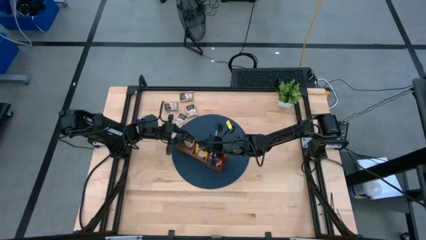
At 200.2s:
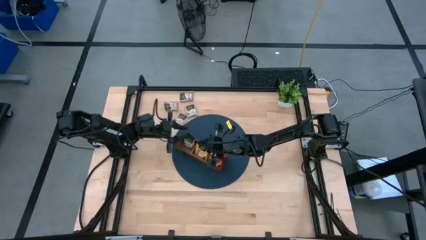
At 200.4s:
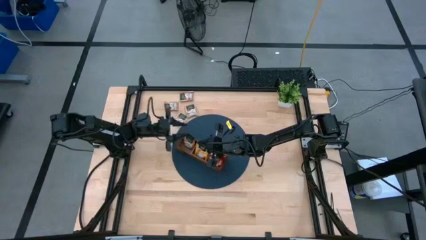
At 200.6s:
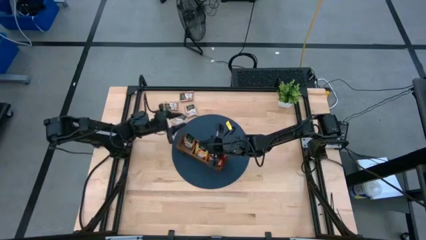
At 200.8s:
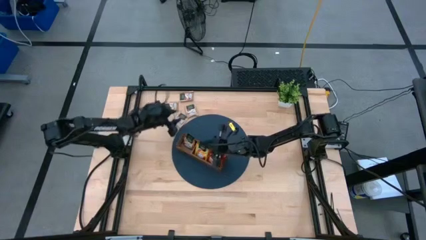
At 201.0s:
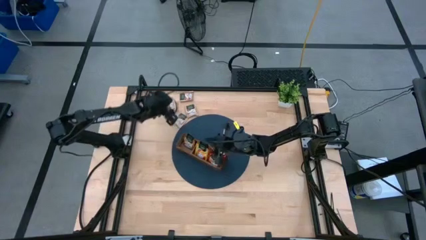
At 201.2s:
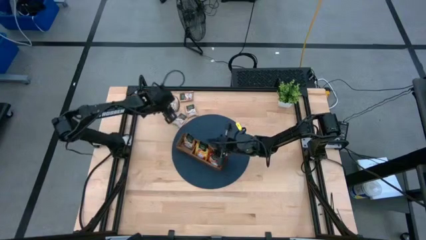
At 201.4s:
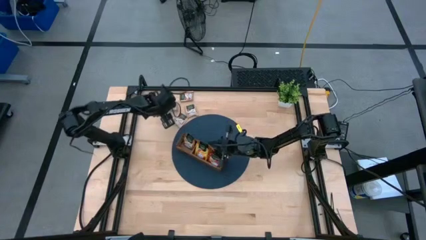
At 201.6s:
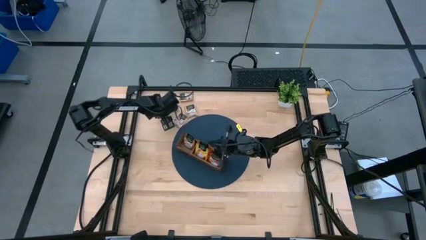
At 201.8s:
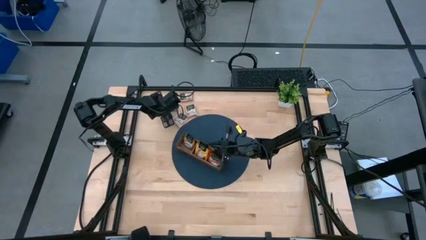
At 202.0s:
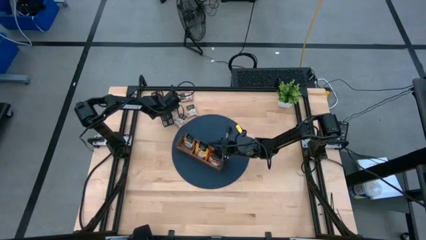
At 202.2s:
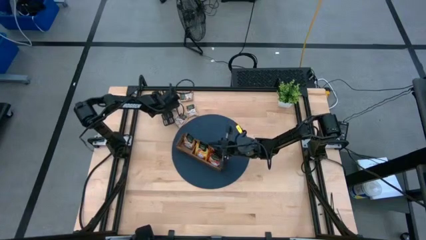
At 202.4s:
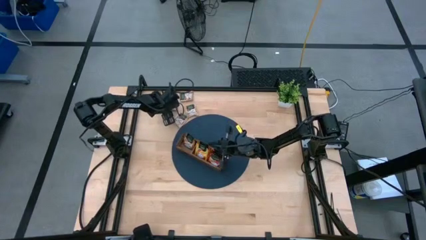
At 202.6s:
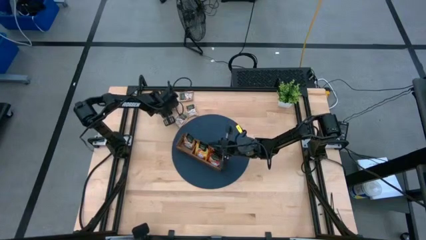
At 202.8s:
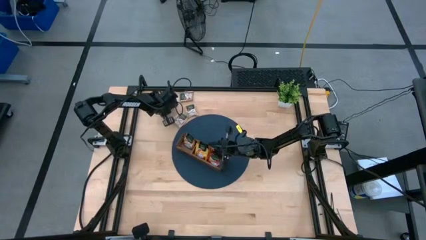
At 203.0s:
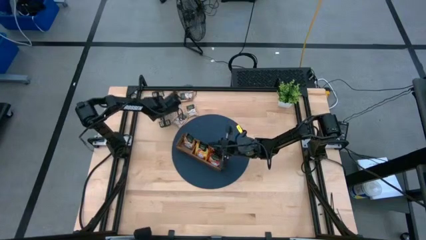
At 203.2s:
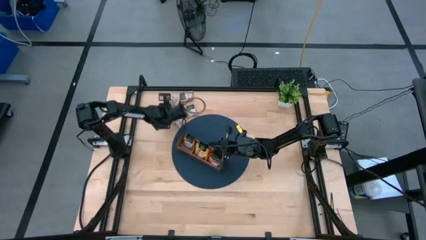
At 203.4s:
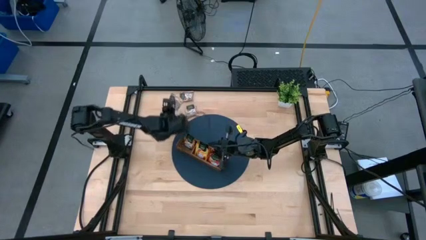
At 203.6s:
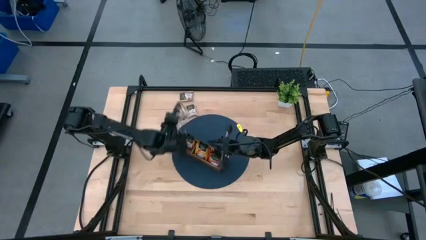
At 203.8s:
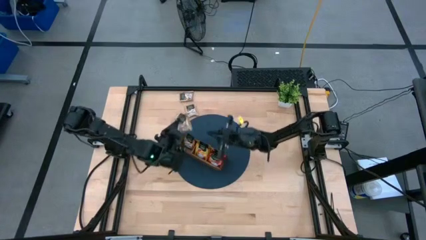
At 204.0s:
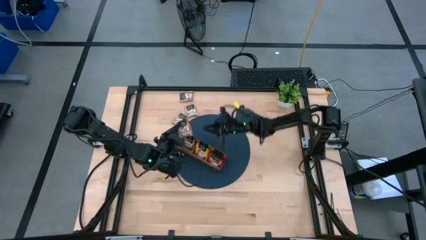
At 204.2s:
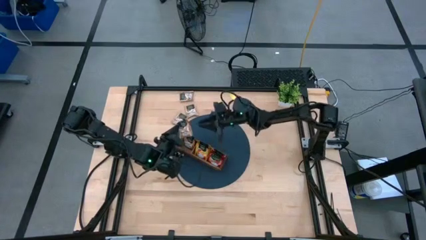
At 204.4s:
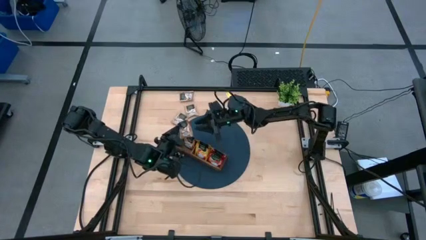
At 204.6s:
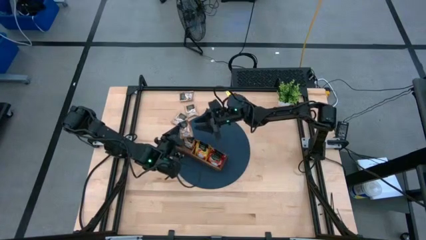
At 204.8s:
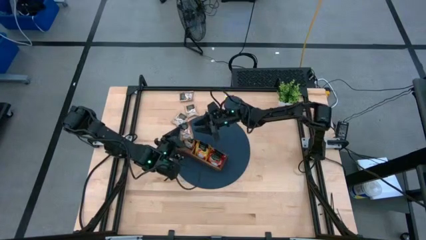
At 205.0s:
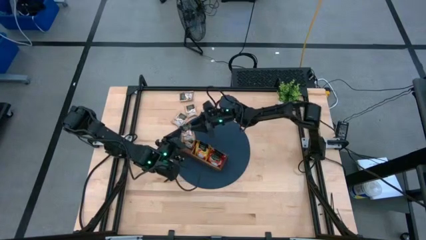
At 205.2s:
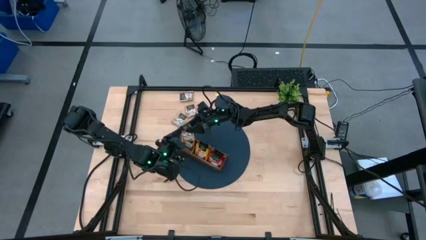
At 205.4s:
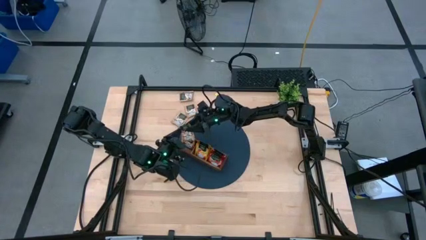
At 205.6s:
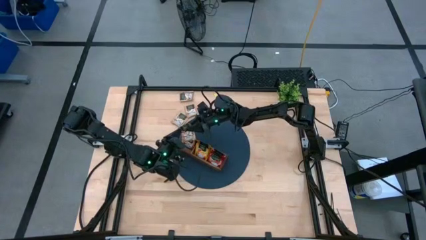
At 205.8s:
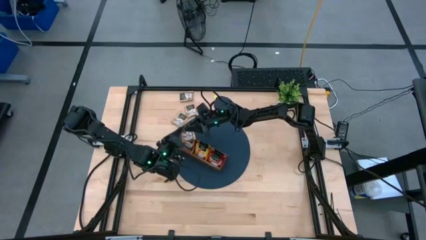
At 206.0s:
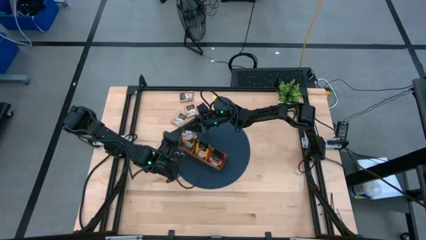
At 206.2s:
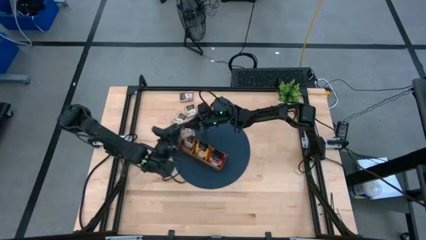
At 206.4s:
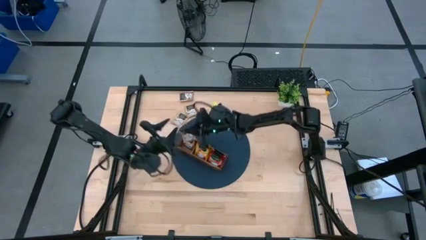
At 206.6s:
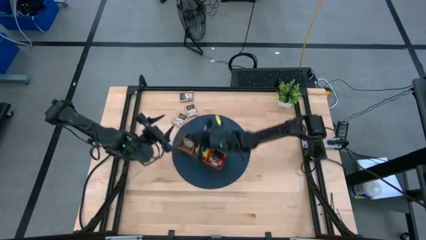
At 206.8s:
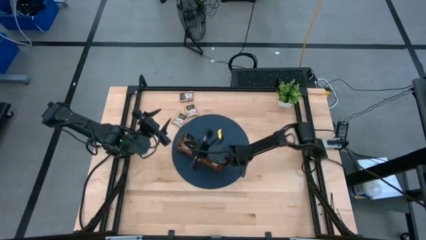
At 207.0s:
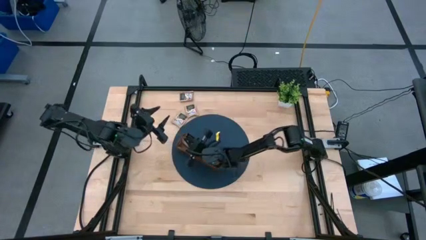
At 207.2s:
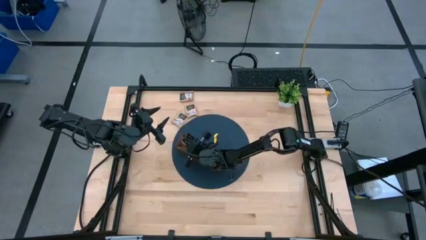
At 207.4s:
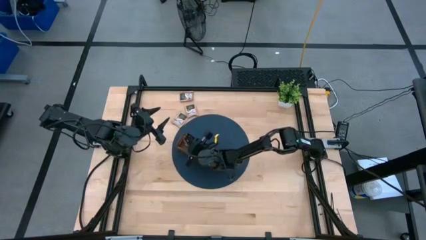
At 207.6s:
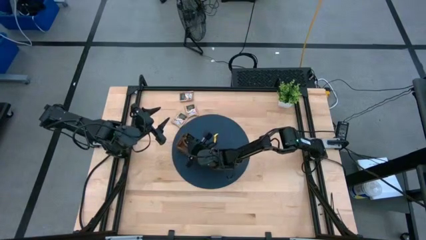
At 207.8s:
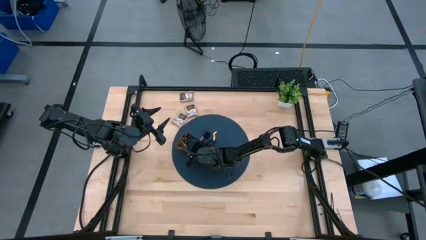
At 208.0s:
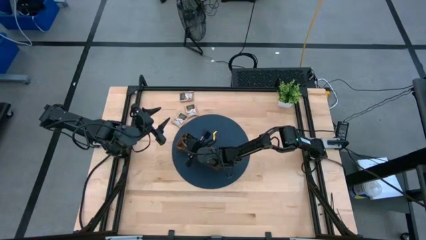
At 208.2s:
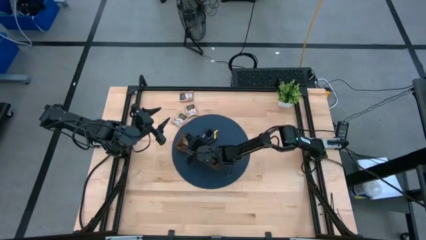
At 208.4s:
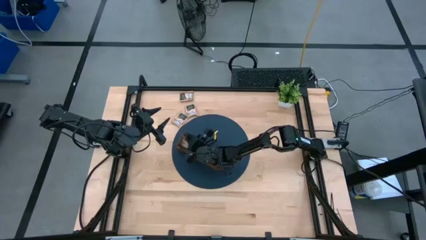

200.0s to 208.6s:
Task: Pick & Place Tea
Put the brown tea bag into the left section of the wooden organizer

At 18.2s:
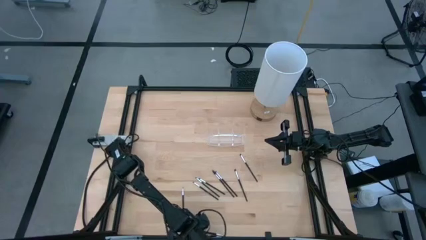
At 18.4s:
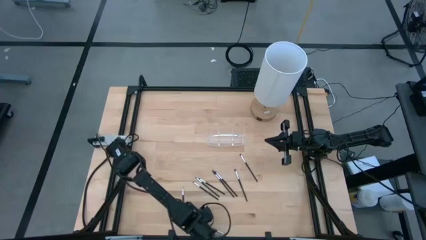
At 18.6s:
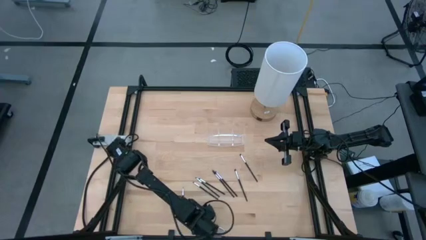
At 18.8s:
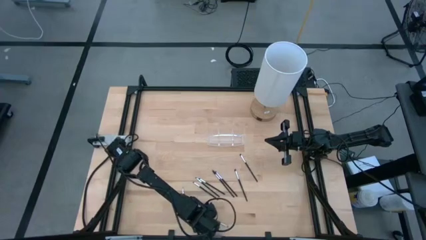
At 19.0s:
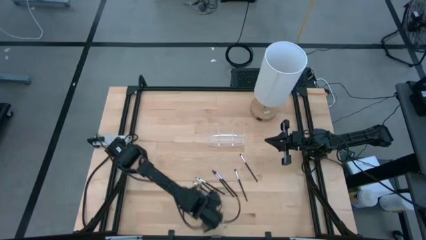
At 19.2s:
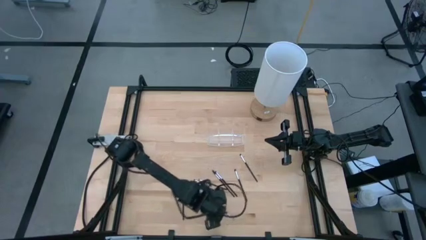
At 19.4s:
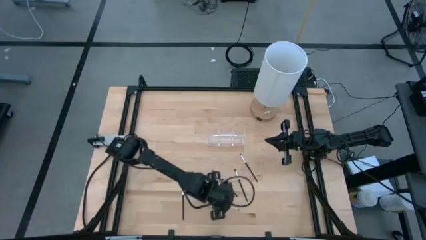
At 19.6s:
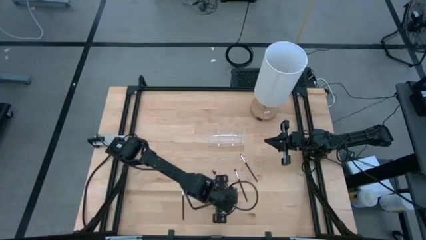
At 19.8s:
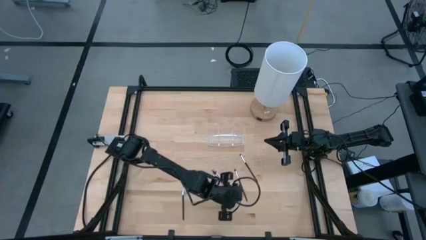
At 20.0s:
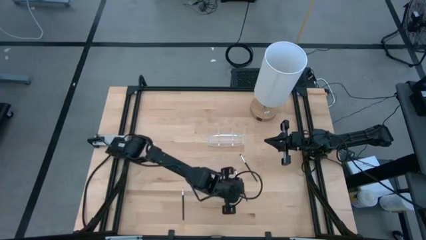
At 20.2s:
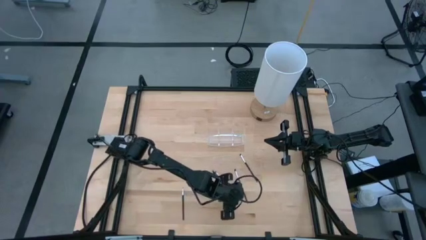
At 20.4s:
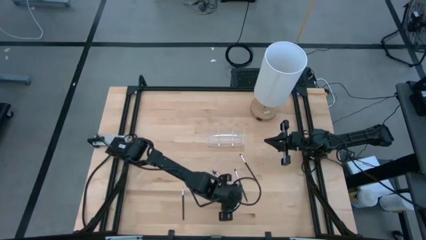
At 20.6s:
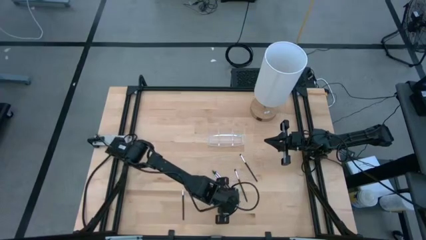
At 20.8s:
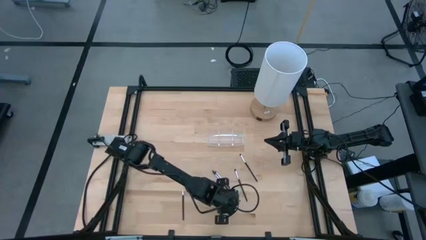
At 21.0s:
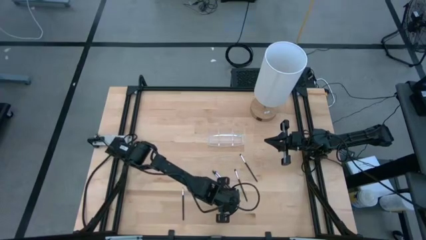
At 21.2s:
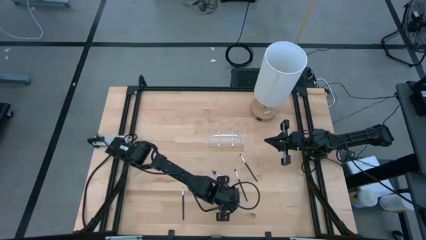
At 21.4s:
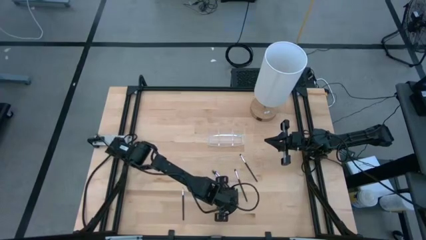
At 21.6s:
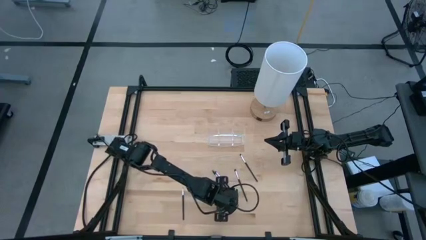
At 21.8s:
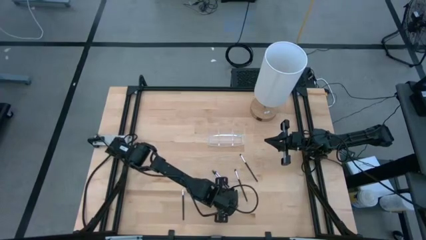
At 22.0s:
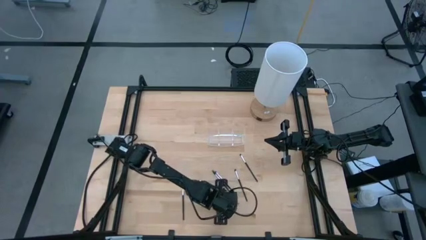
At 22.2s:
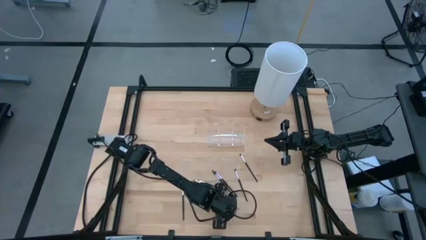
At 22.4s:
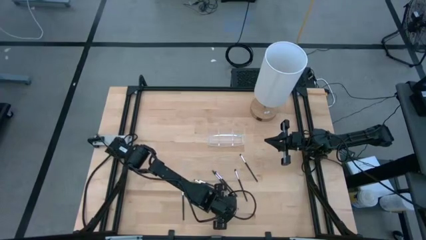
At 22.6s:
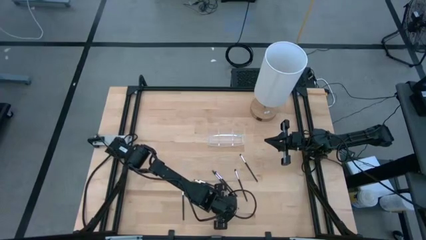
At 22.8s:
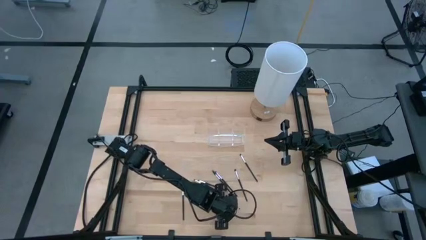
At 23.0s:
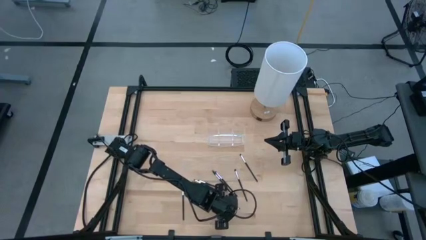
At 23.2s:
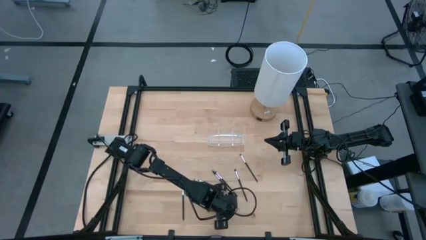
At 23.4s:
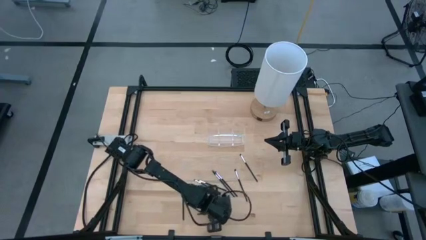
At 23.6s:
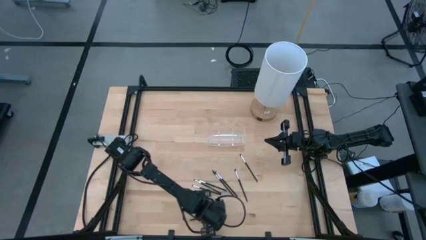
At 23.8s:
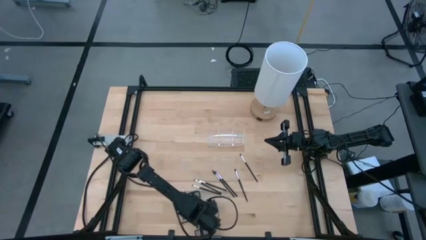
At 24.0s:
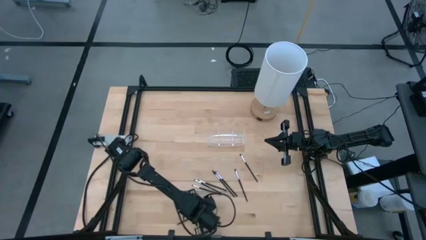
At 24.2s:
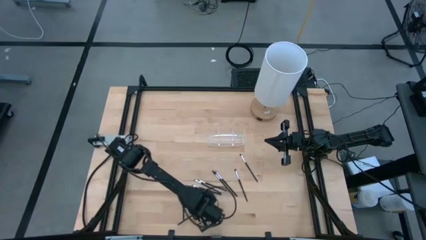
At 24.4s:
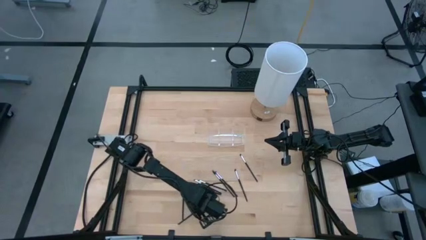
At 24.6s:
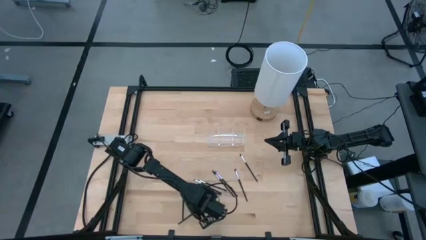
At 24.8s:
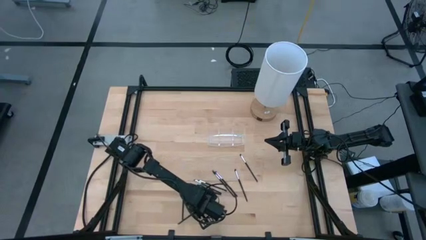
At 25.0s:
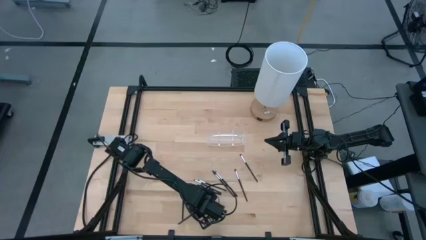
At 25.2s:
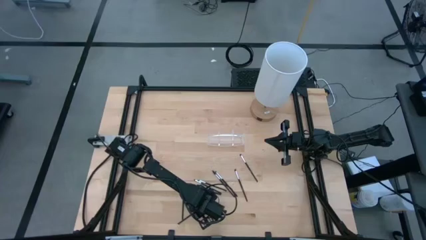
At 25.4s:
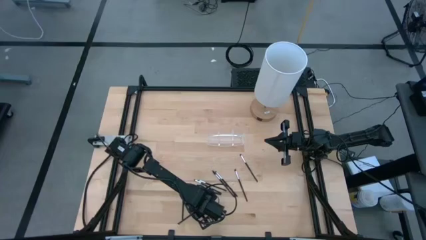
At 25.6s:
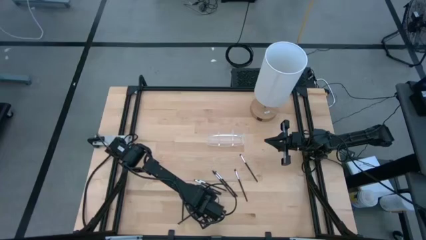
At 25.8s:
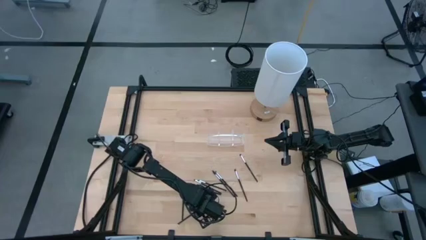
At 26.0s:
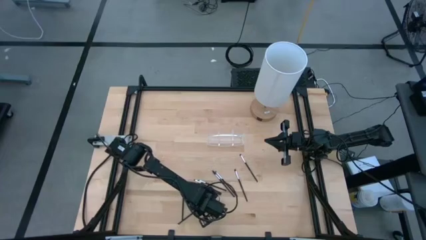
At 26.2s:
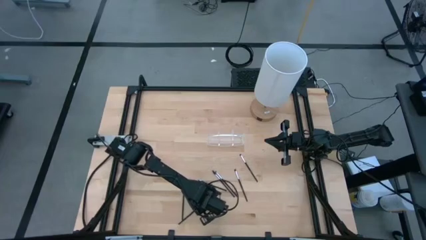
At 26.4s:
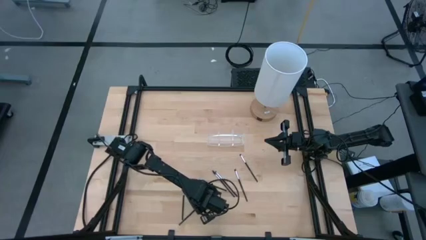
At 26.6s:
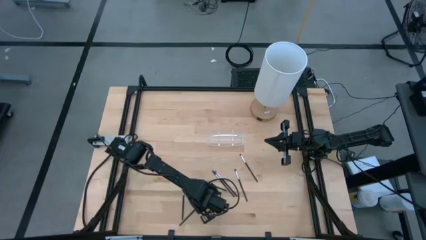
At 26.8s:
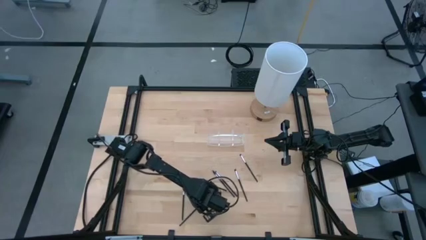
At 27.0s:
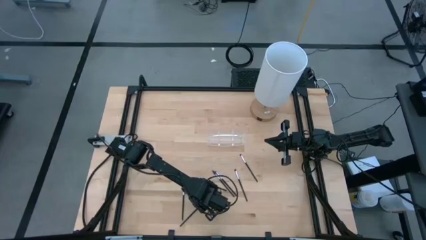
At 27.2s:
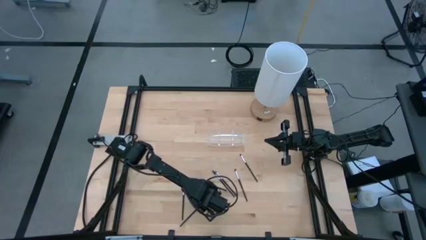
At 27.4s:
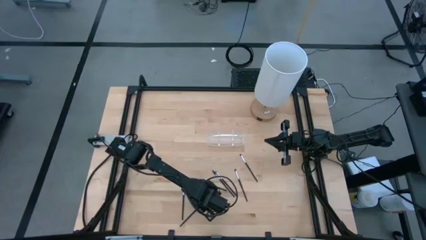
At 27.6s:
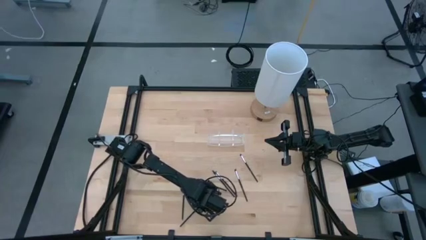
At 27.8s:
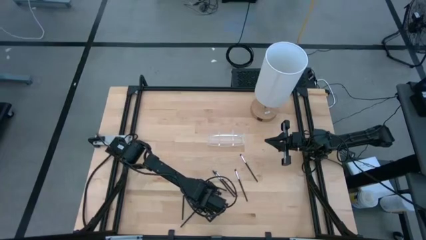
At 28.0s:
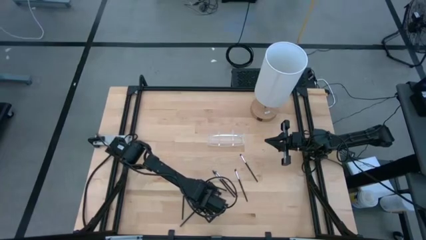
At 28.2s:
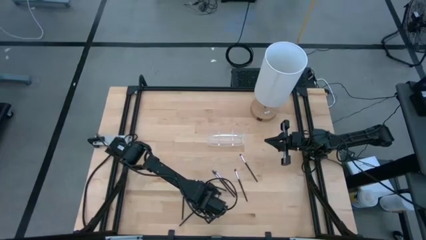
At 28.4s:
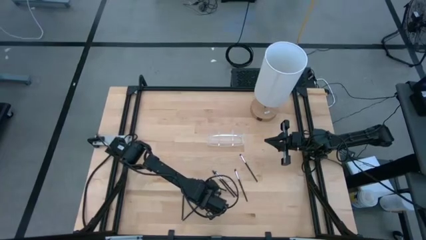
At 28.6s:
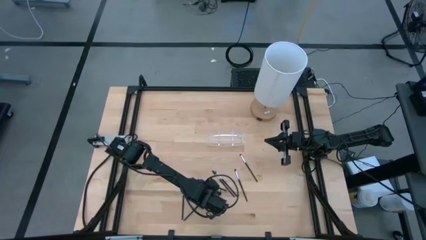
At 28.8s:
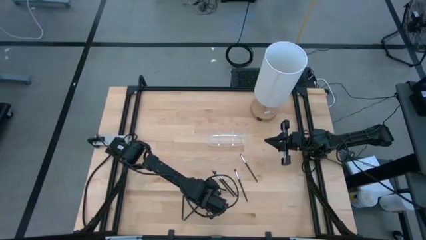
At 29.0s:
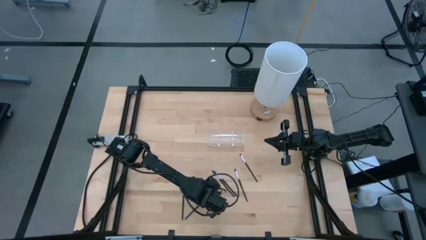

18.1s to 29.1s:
Task: Put items in baskets/containers
Put the black eyeshadow brush into the middle section of the transparent organizer
